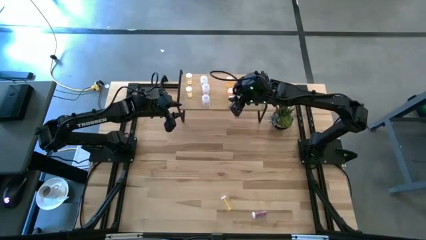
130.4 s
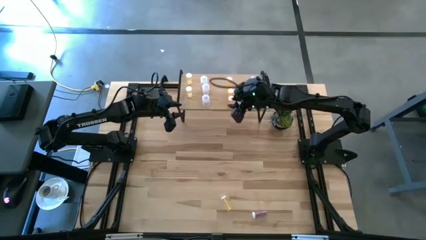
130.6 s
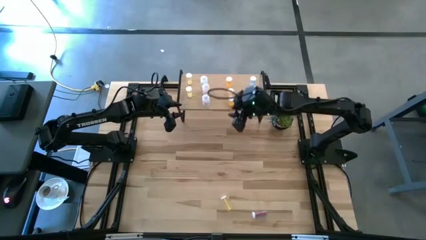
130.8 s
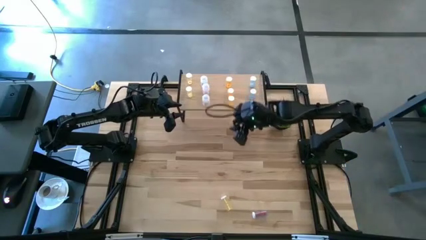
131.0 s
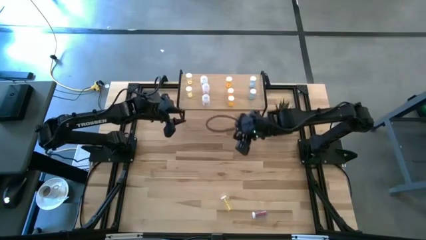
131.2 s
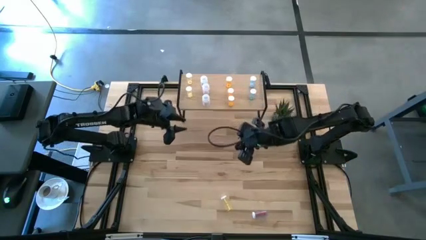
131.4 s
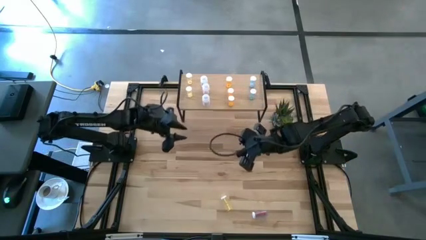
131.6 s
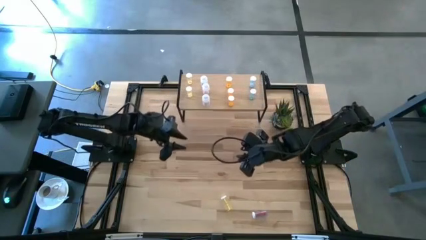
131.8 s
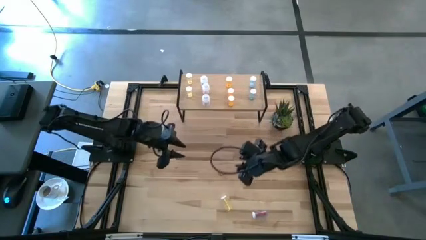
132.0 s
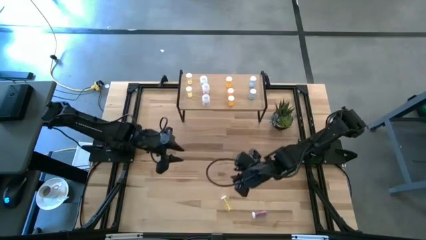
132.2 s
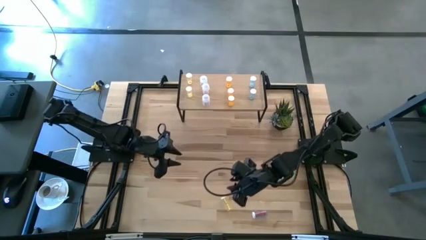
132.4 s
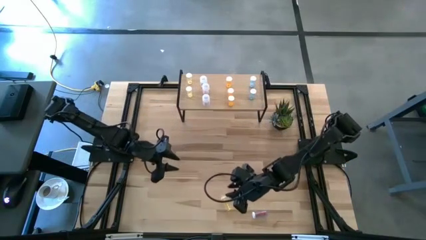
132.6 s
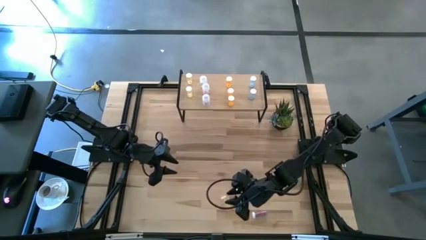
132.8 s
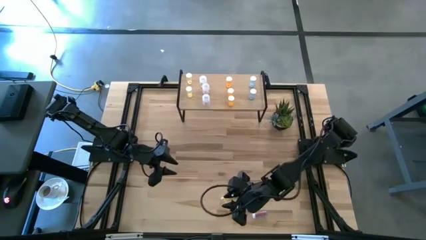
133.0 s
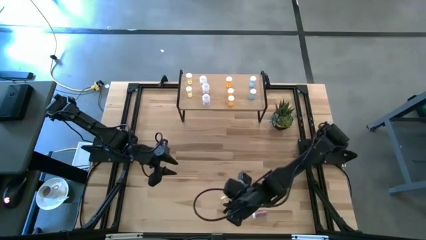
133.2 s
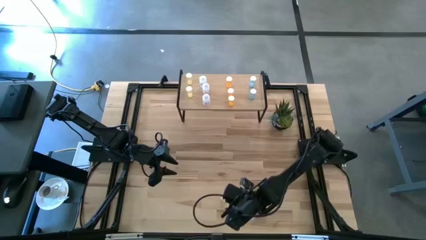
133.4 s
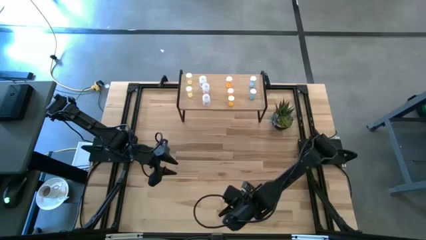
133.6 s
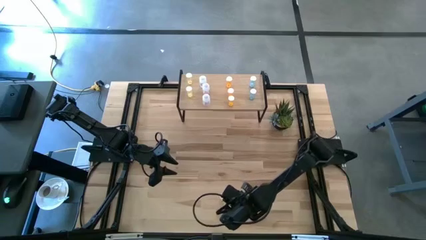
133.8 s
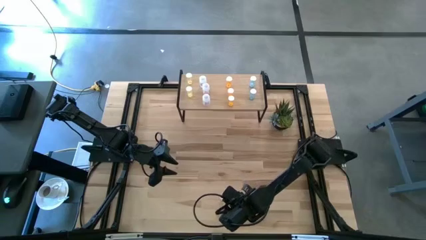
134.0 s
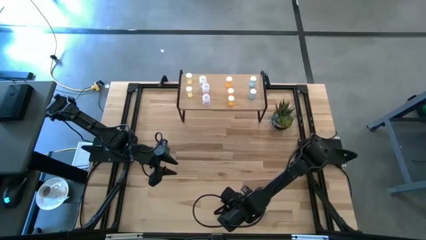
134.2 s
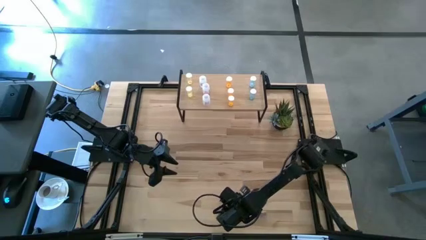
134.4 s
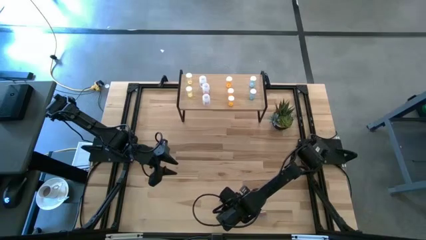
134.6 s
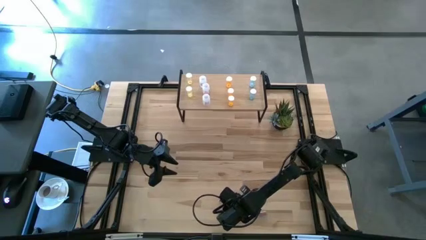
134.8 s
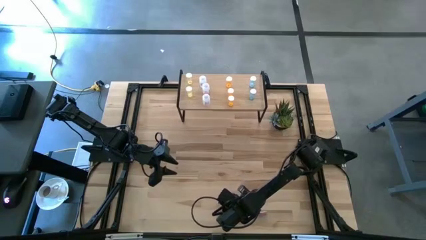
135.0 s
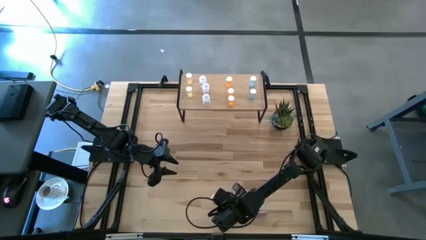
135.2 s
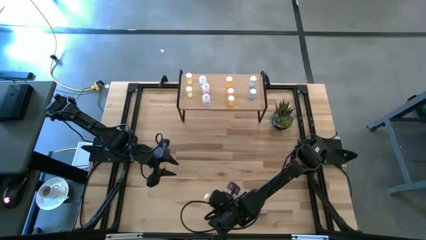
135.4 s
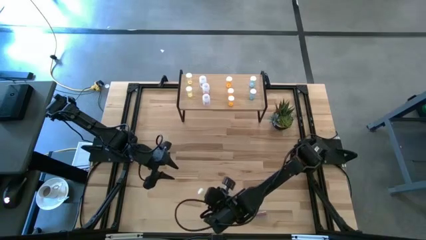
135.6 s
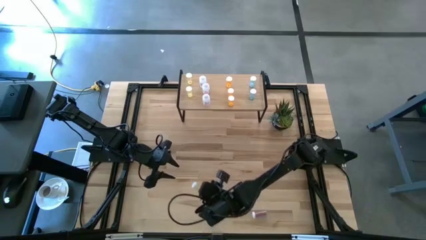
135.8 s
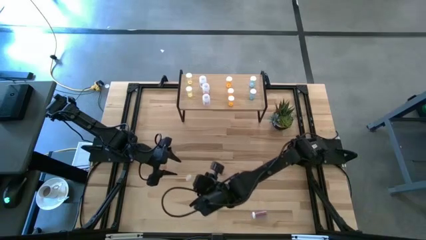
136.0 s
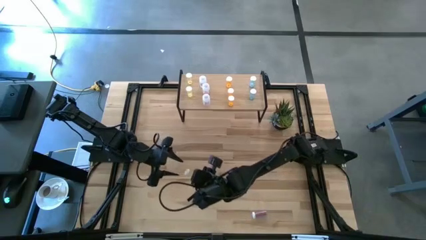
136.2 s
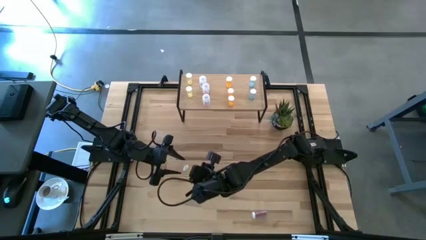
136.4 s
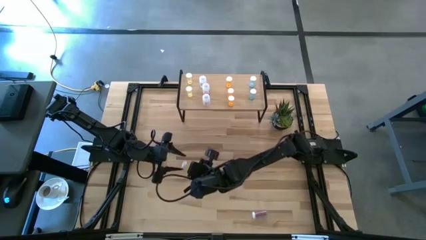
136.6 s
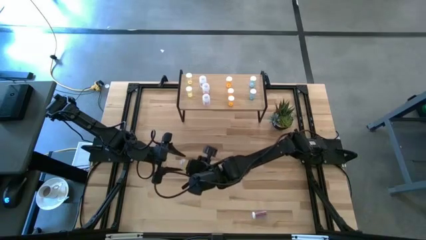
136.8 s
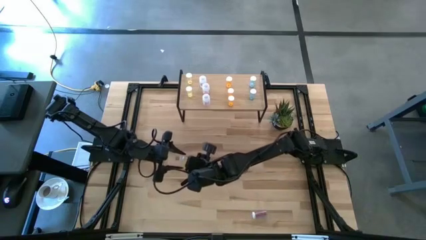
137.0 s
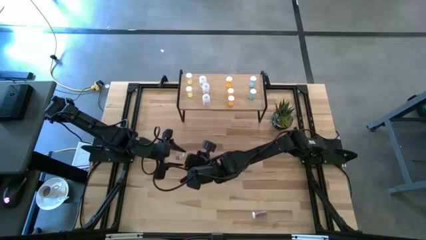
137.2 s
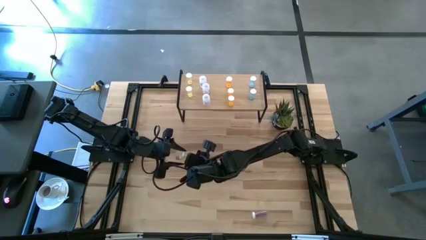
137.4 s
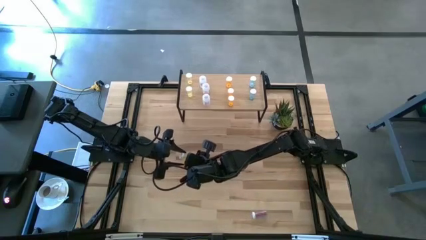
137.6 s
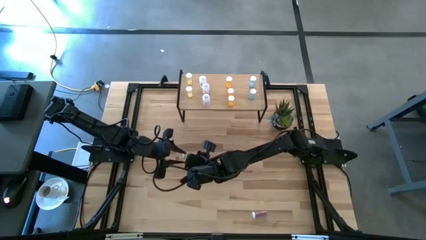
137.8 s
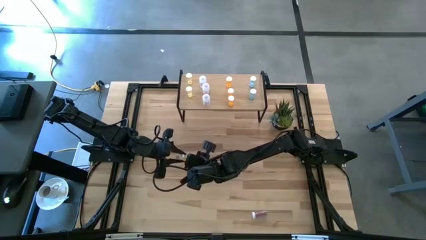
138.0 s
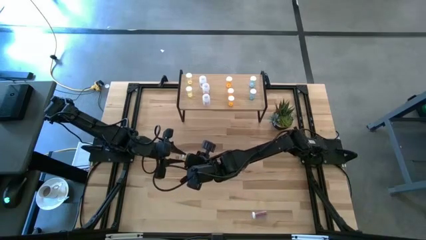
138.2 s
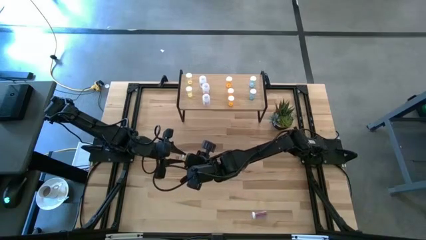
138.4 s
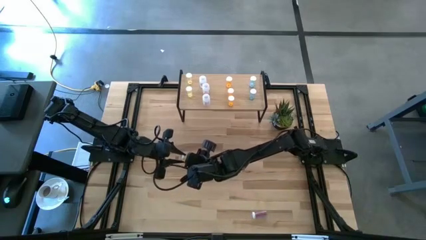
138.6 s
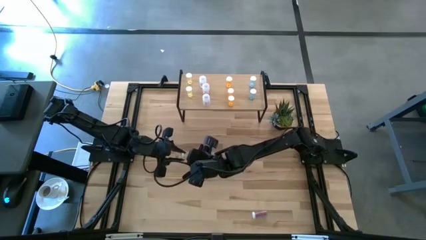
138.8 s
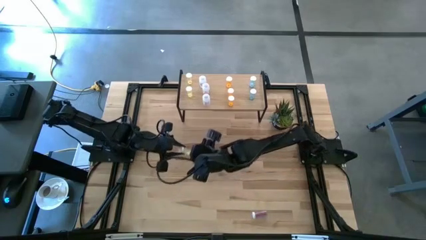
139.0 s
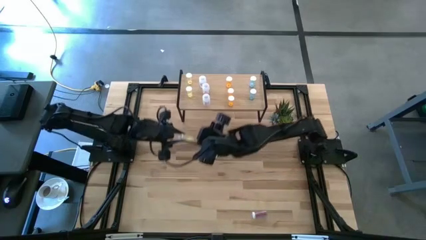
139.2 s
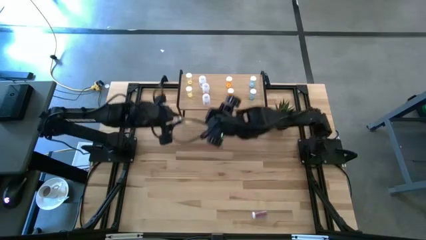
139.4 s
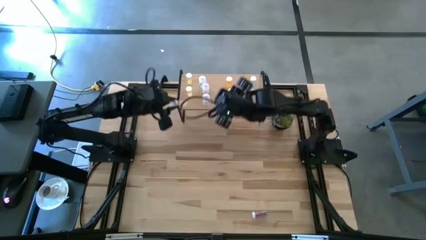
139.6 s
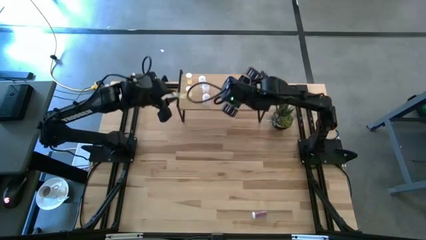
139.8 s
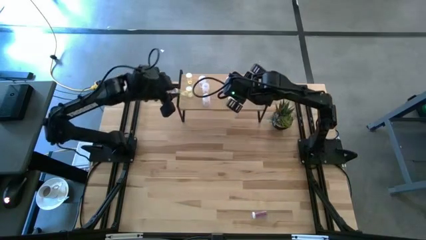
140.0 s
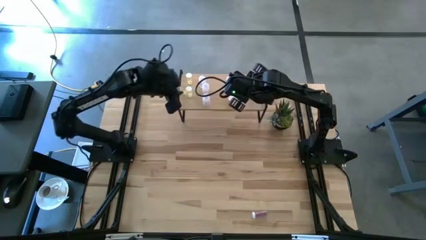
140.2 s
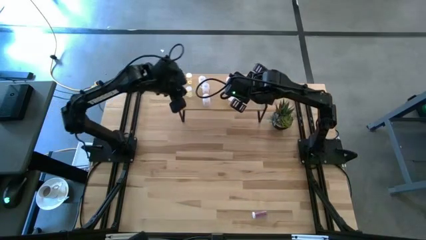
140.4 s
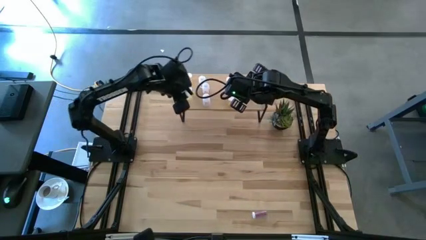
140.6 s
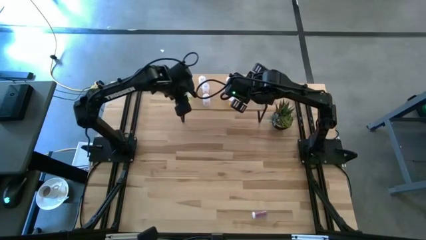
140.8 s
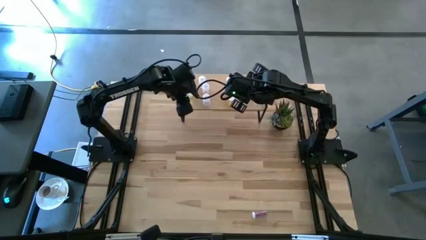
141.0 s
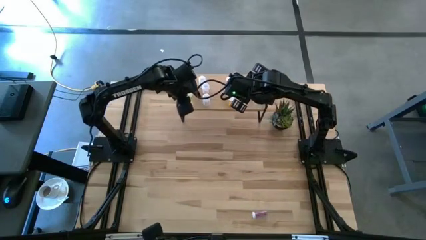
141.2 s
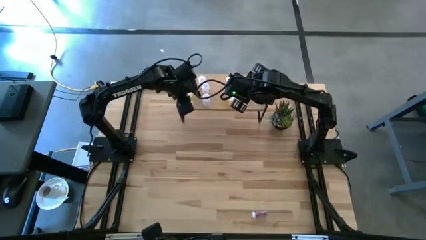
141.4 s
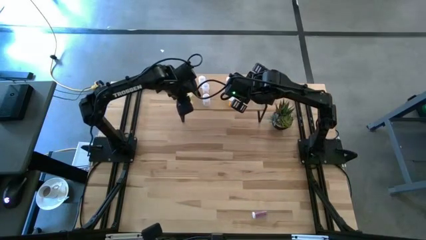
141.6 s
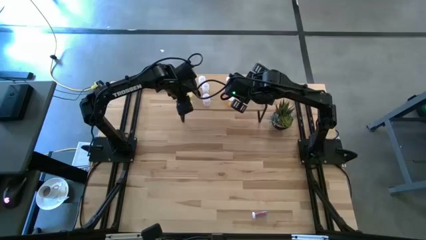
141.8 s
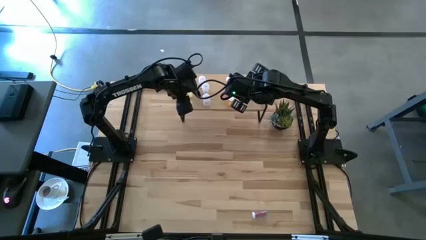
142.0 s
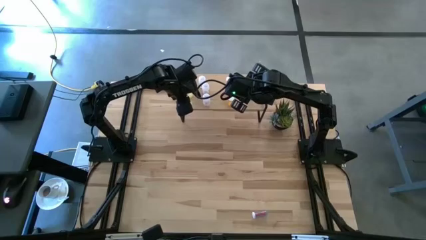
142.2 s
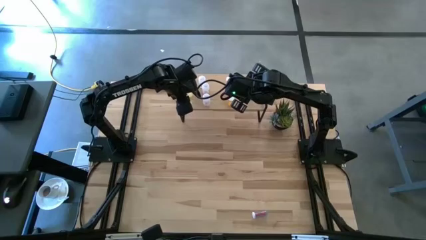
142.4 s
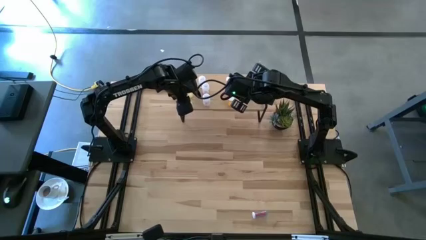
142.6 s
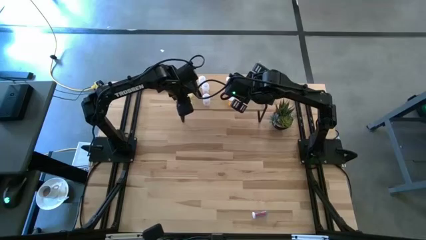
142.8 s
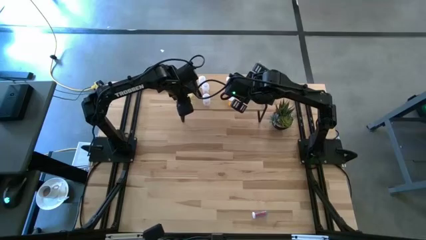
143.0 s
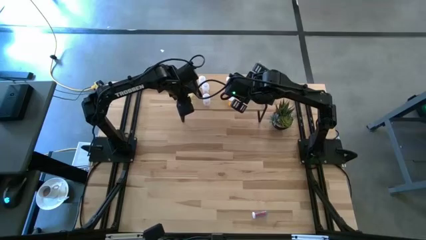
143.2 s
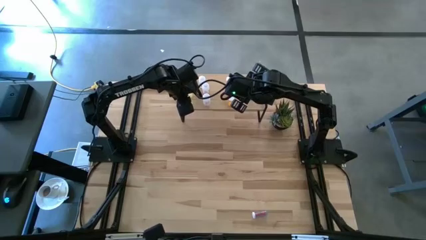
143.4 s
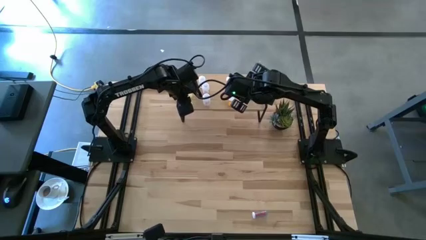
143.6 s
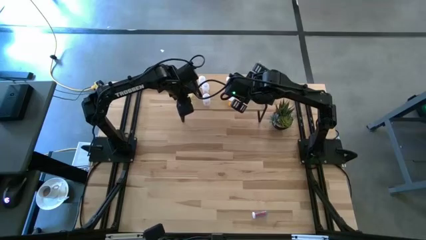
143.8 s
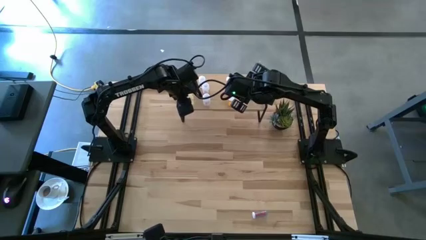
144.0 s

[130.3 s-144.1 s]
Task: Pick and place medicine bottles onto shelf by color
Put the yellow pill bottle on the shelf aligned with the other yellow pill bottles

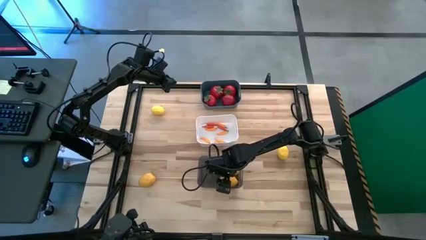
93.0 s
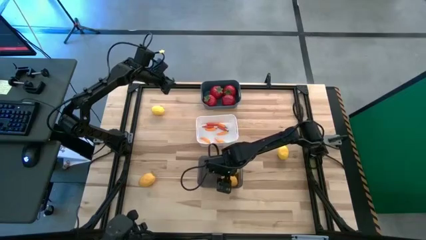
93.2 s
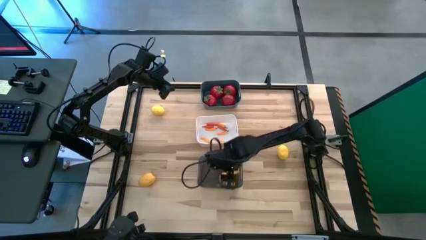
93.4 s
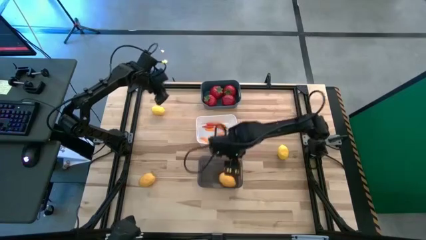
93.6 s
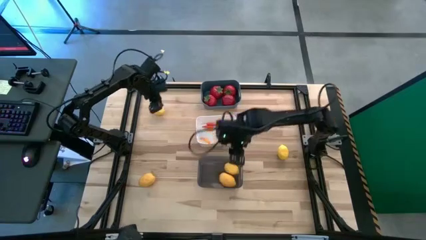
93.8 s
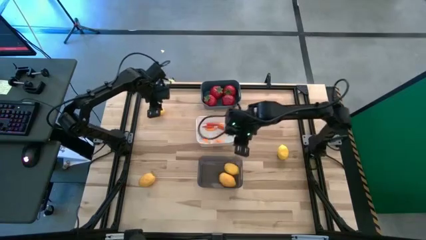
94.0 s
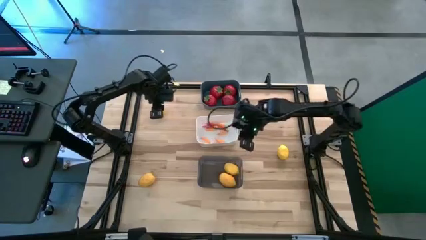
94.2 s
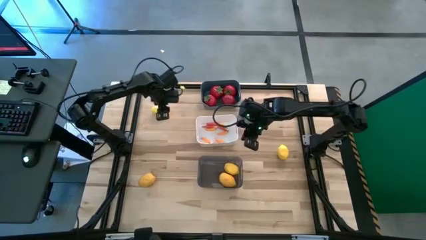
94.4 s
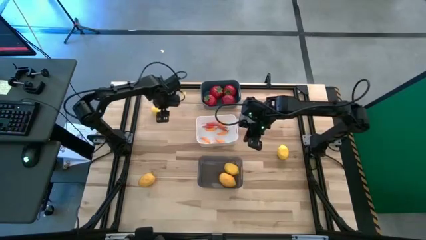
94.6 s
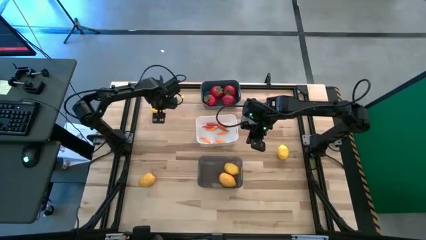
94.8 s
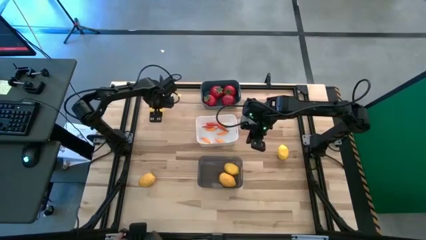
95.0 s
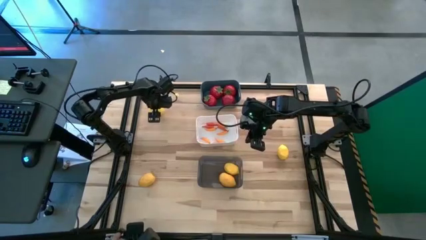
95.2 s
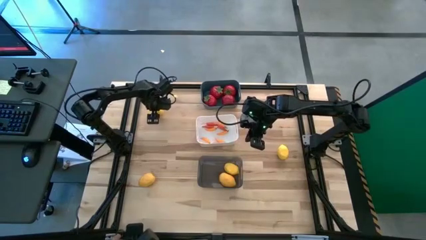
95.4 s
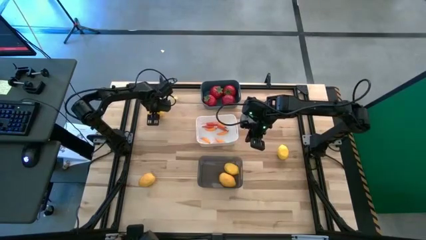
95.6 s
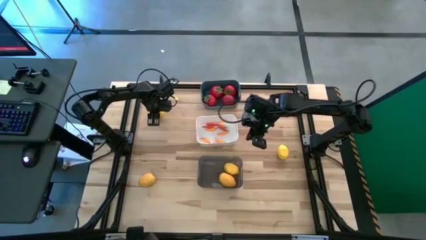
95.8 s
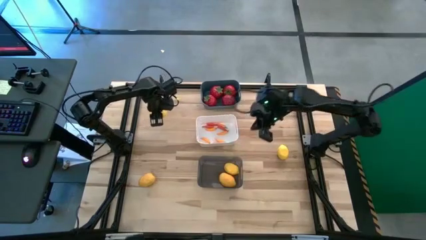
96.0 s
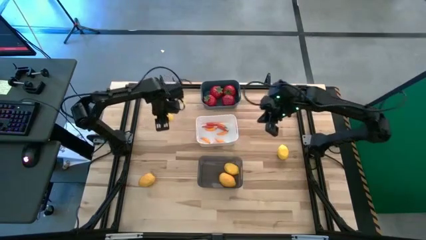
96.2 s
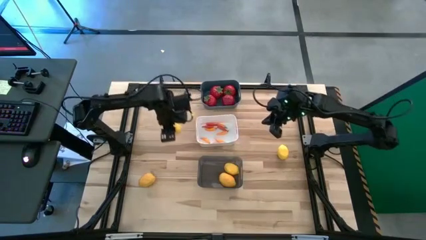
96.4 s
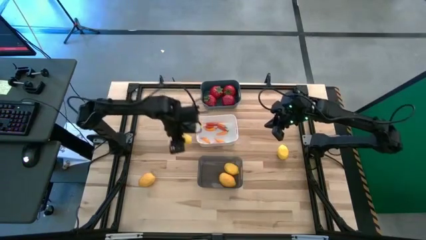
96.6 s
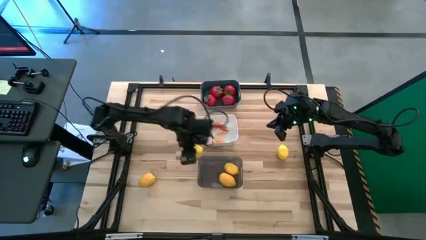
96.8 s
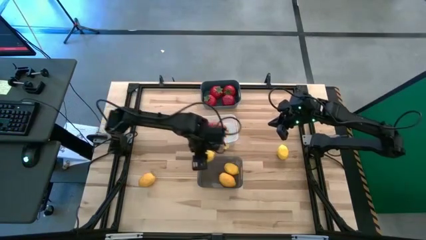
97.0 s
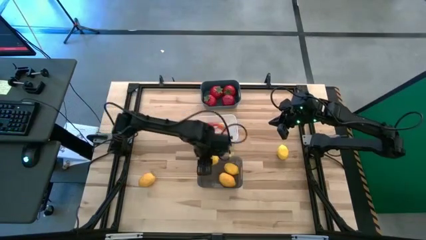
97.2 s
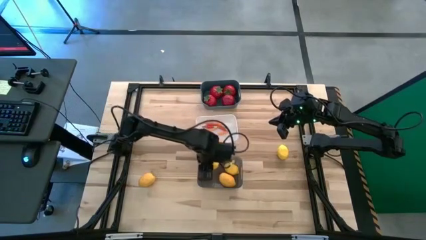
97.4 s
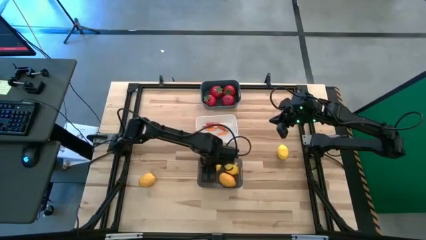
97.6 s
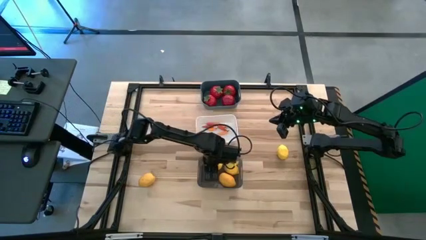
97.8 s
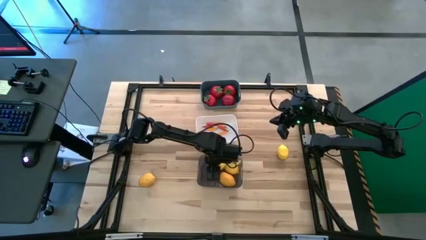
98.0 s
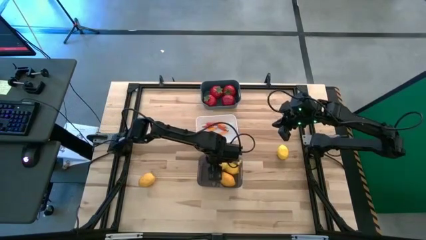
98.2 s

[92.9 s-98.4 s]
Task: Sort produce into baskets
Put the yellow lemon into the black bin
